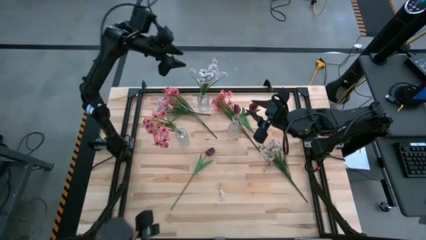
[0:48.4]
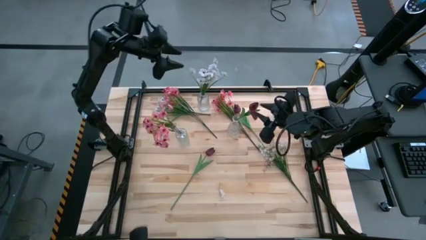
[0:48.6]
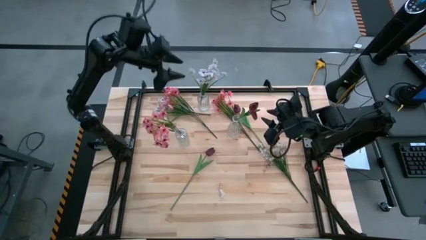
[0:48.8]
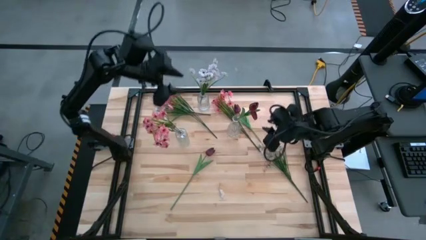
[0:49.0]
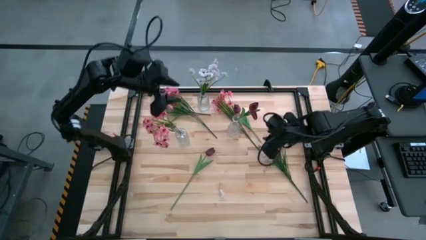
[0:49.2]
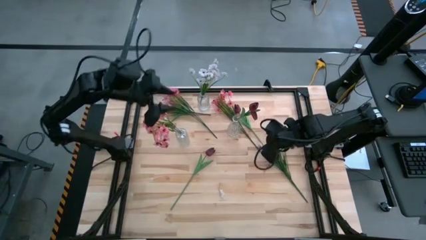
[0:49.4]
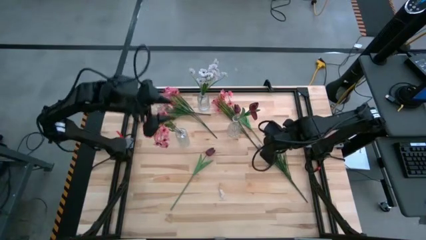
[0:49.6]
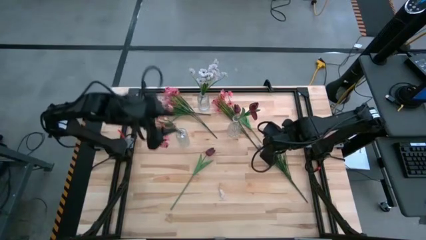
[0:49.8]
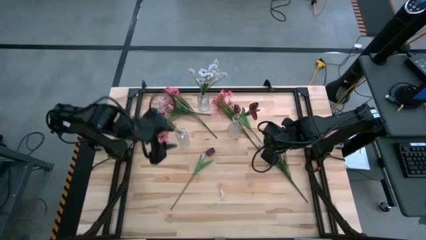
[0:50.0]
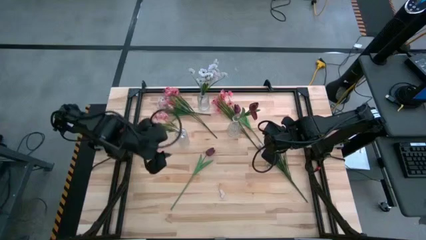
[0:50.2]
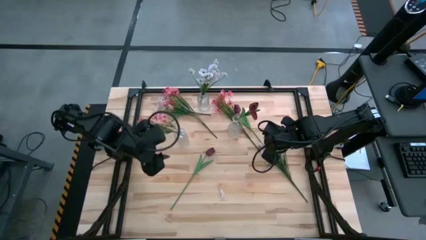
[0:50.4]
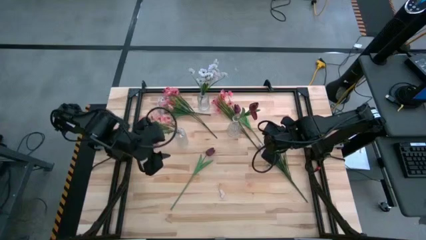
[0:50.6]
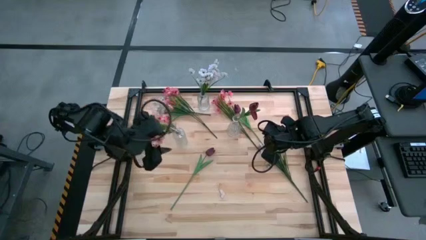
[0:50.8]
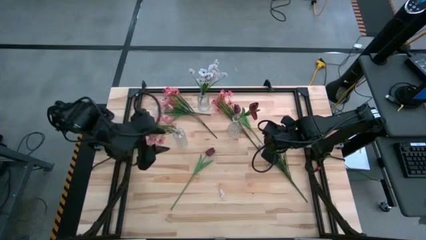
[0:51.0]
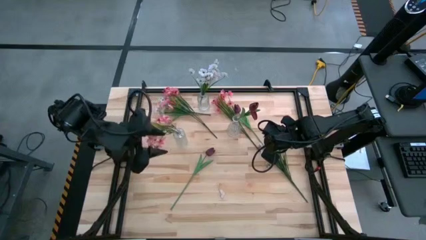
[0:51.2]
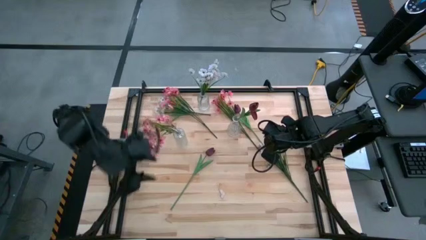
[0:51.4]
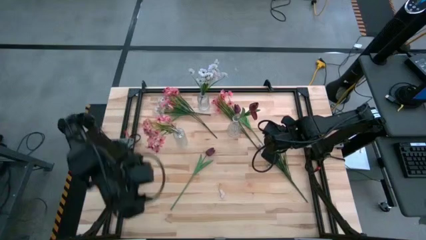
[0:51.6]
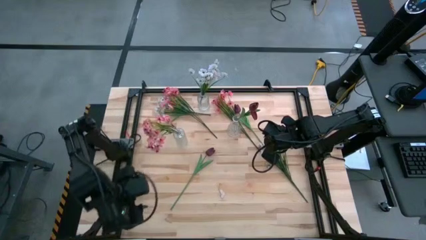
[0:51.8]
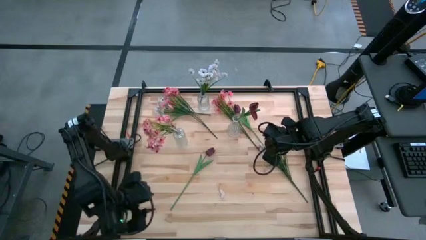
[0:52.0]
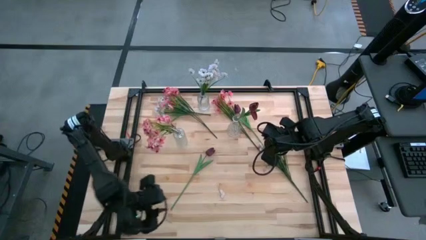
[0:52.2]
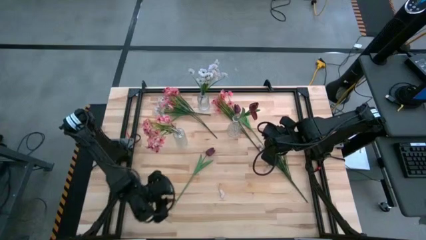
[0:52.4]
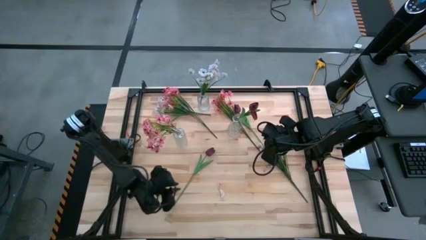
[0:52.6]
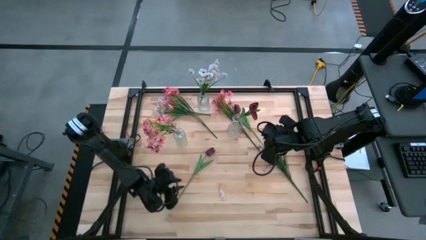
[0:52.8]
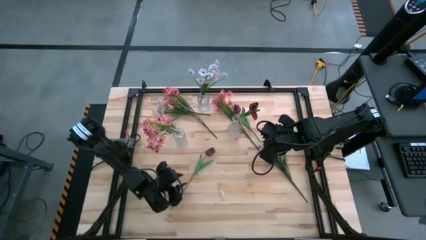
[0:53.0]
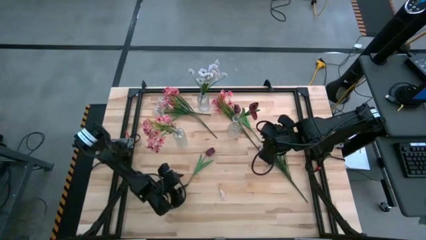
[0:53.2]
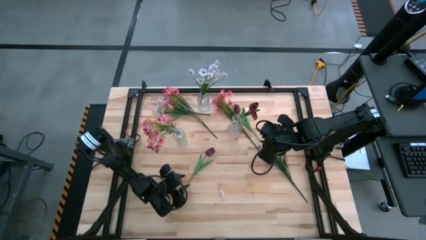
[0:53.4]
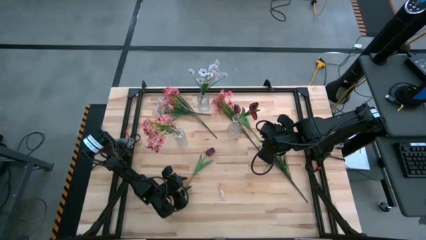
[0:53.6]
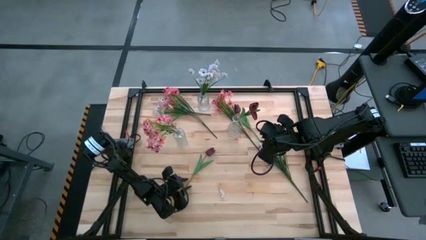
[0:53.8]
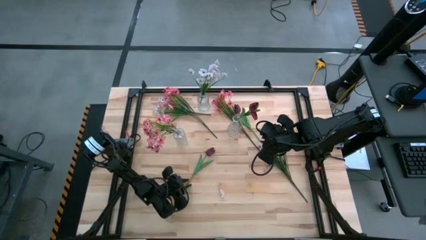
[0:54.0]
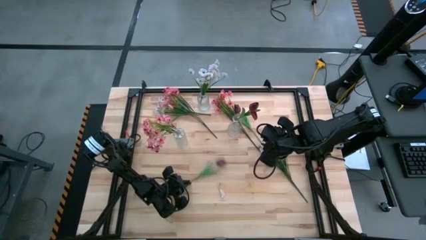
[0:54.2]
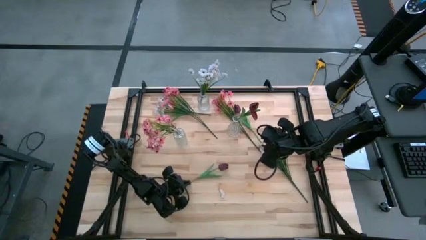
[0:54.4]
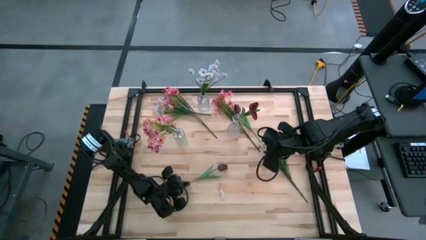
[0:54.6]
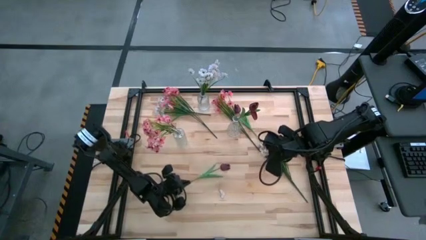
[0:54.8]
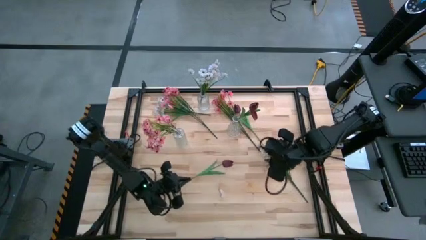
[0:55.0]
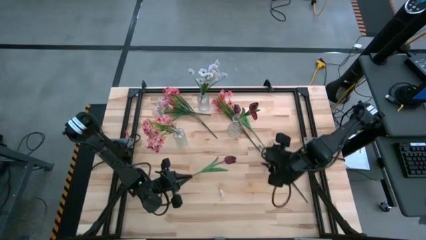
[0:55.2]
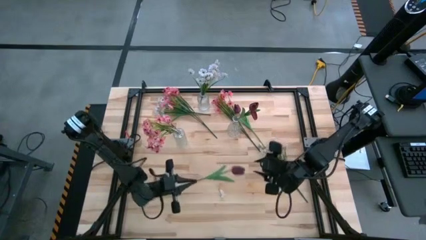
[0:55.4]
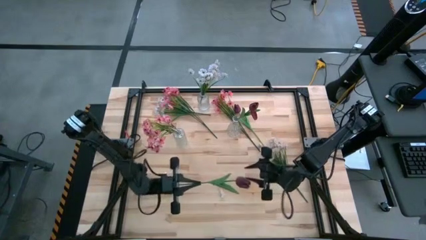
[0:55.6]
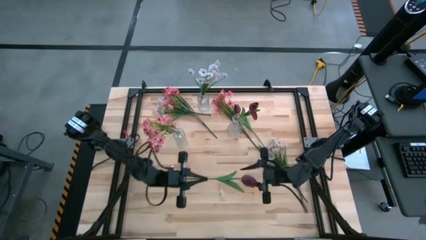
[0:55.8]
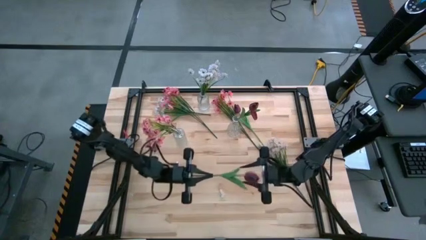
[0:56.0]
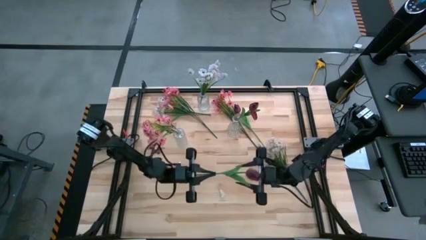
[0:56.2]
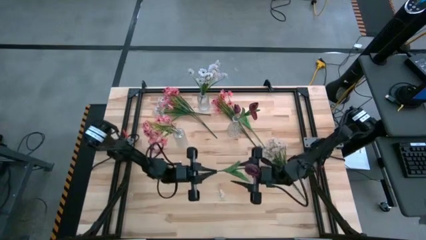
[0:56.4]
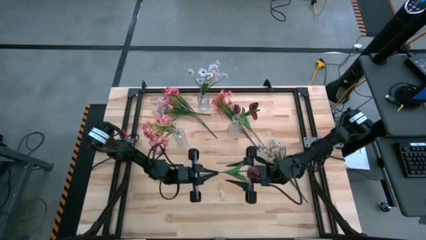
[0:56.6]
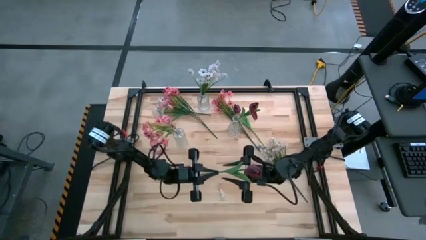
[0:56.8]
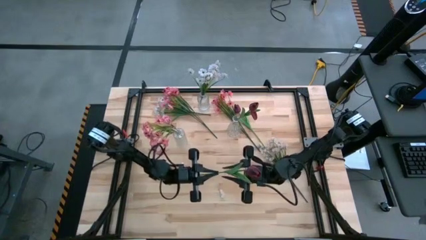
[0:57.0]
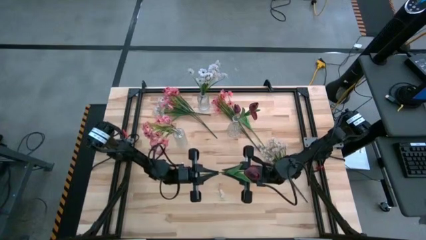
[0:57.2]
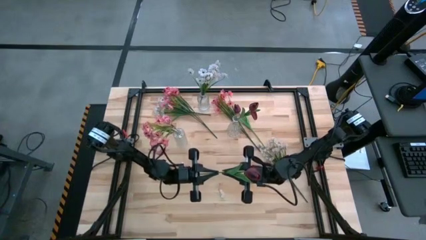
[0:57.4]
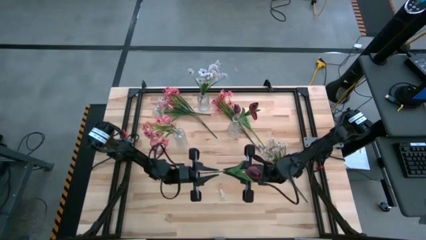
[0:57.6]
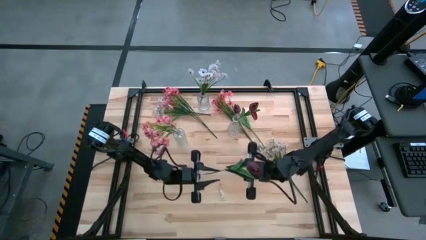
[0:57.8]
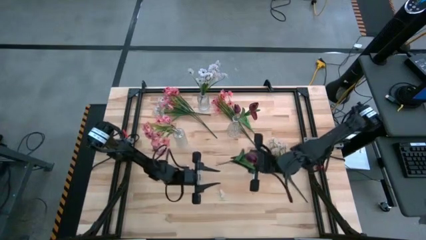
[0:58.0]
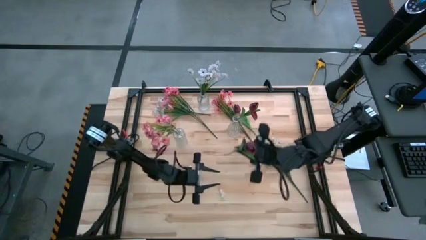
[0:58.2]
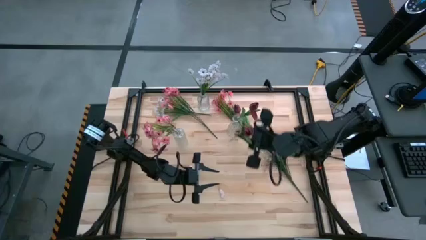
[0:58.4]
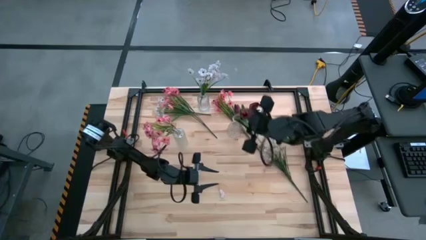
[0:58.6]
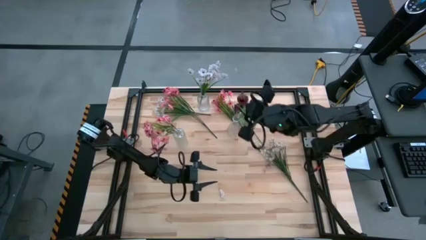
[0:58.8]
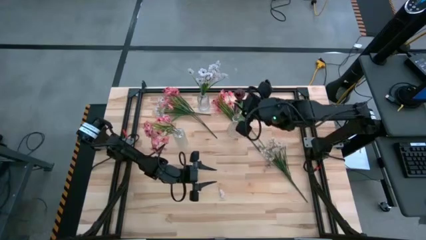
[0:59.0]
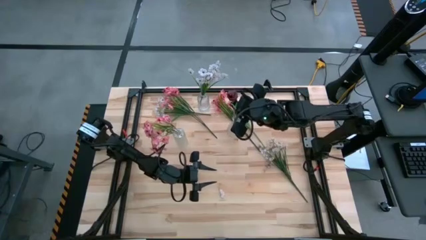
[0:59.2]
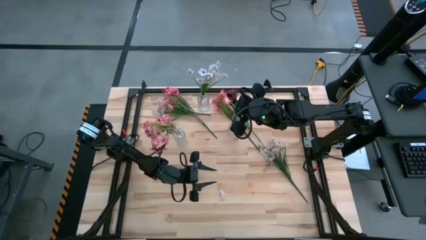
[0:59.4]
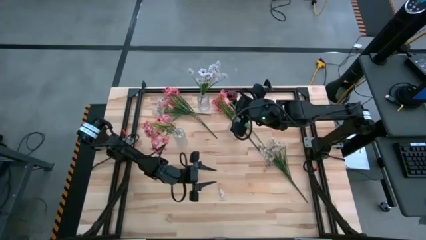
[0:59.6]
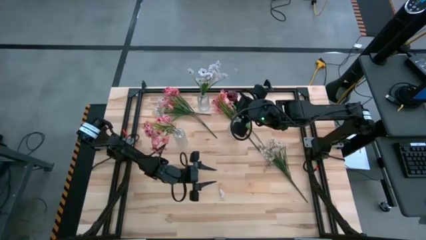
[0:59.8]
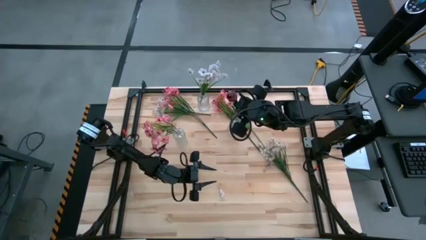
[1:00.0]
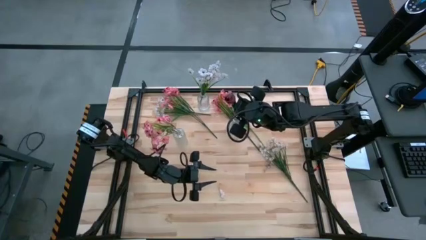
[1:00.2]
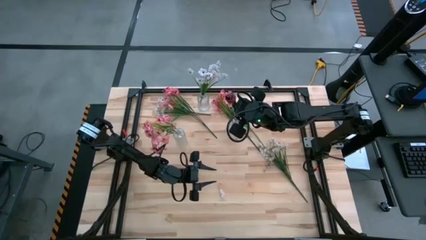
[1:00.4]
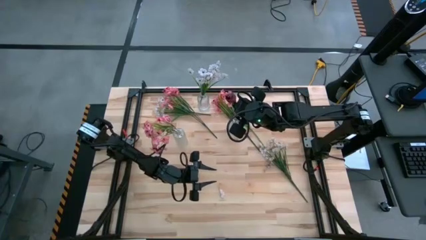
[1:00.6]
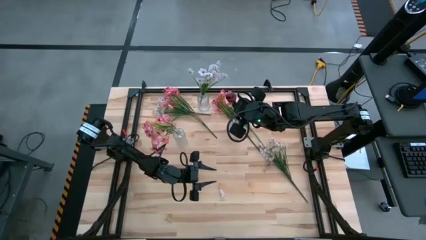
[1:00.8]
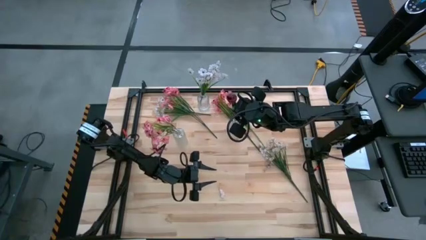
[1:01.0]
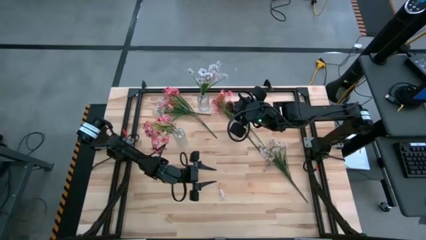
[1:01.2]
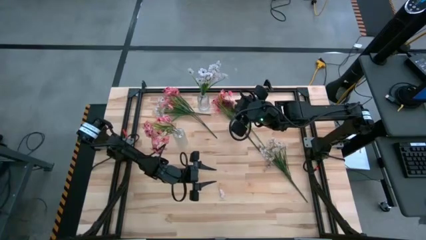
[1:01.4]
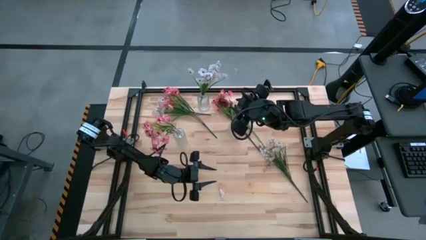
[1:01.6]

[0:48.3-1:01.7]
Task: Sort flowers into vase by color
Put the bottom red tulip into the bottom right transparent vase
